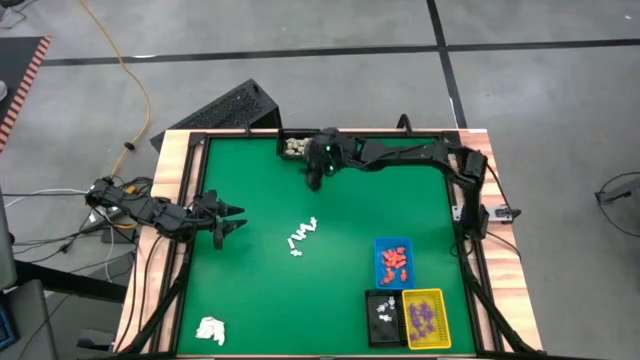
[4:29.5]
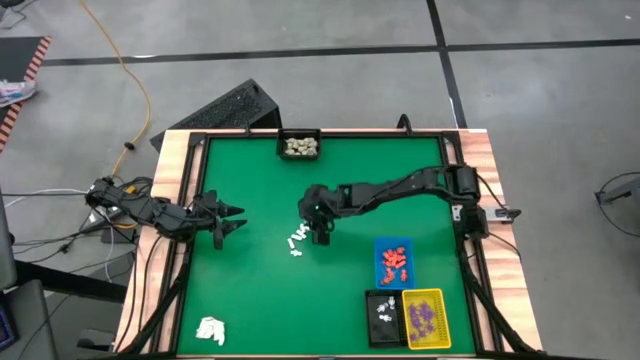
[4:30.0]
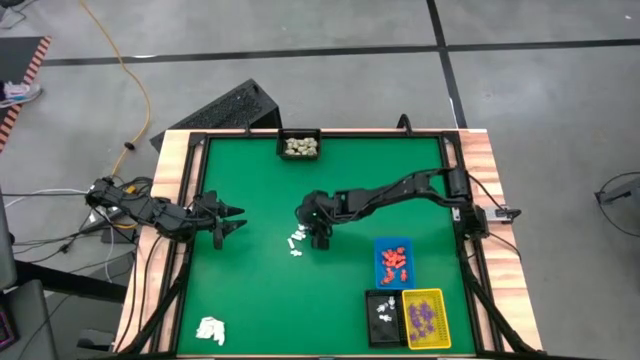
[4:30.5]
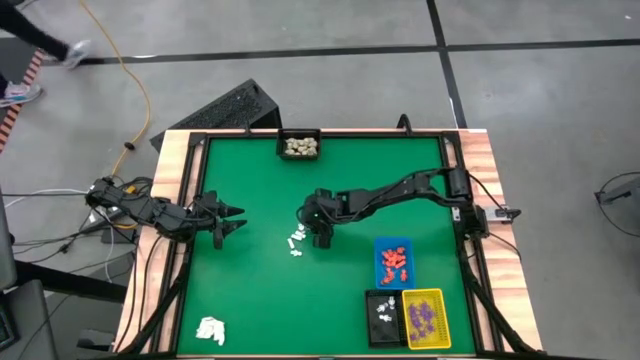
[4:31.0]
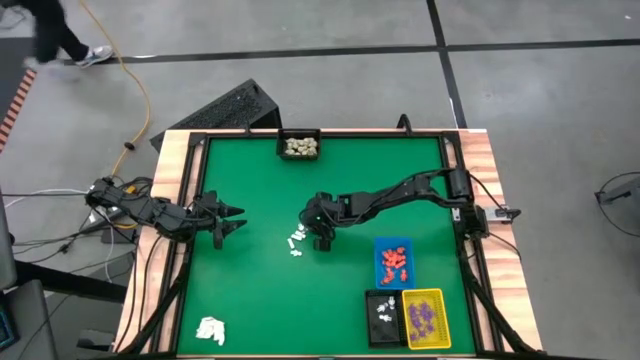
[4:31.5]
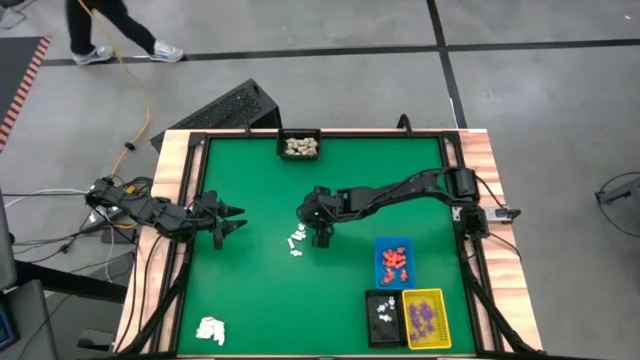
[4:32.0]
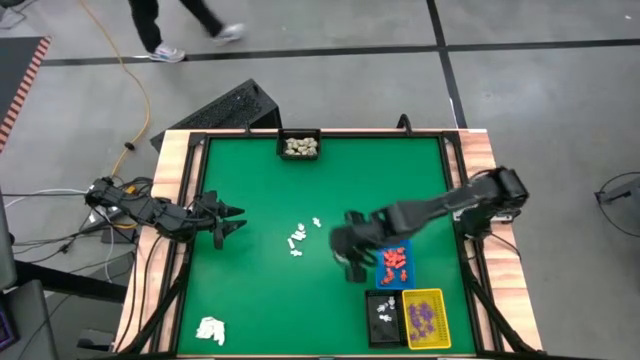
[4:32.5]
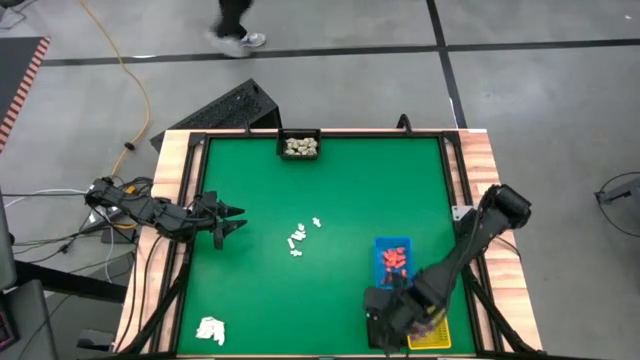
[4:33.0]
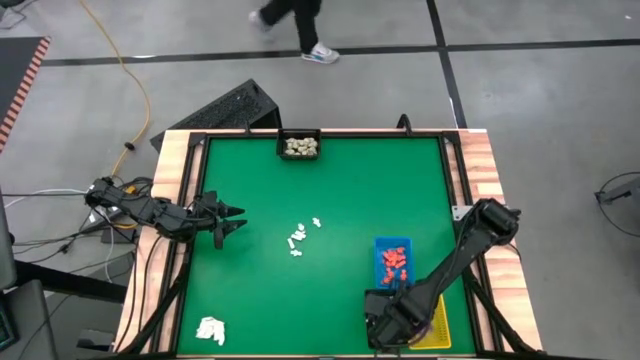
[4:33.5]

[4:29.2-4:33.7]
Task: Sort Halloween decoration
Put the white skeleton toy into the bottom black bin

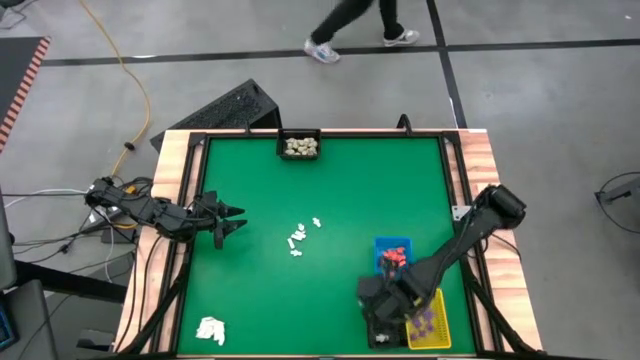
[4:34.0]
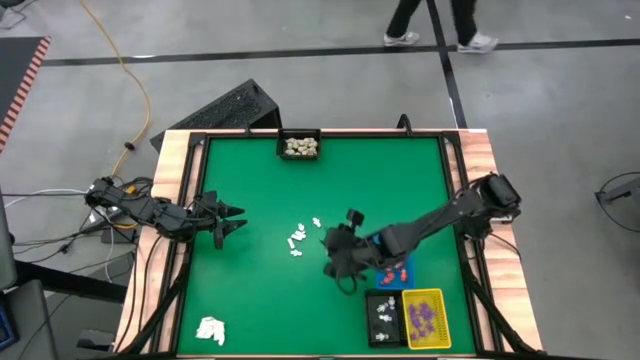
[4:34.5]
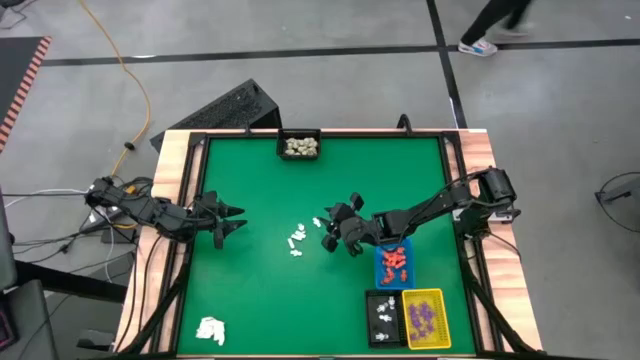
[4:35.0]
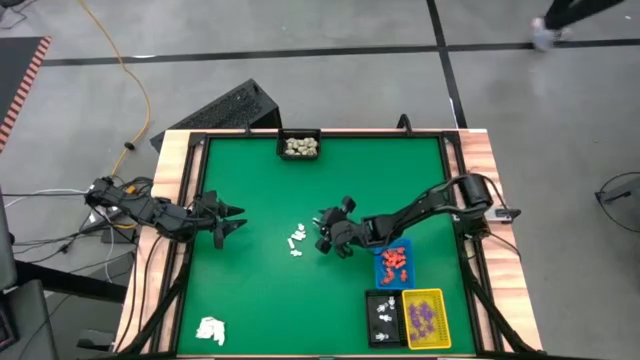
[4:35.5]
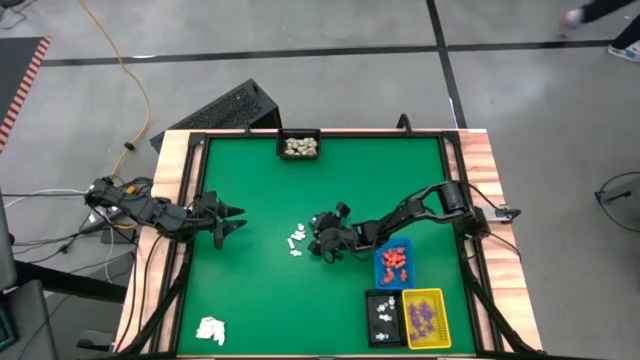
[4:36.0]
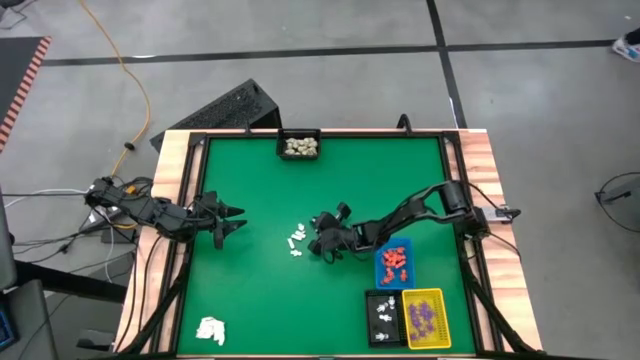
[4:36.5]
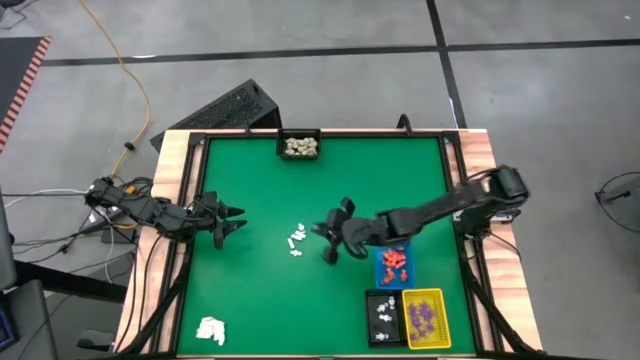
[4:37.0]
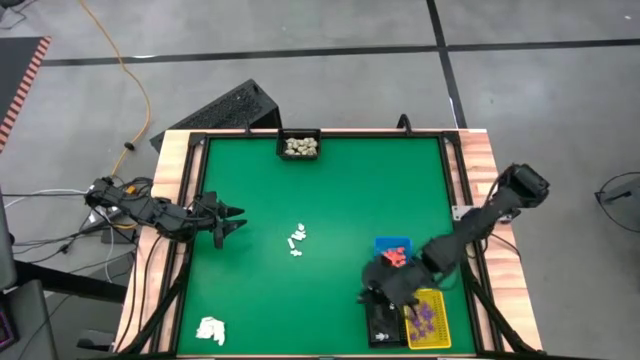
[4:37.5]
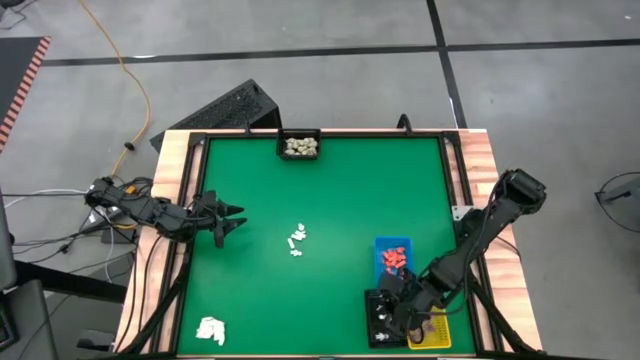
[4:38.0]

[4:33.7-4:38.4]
Put the white skeleton toy into the bottom black bin

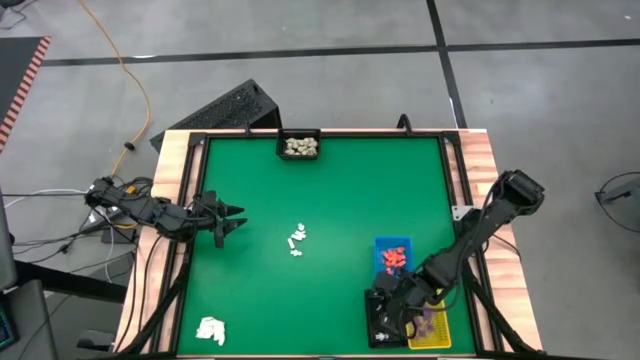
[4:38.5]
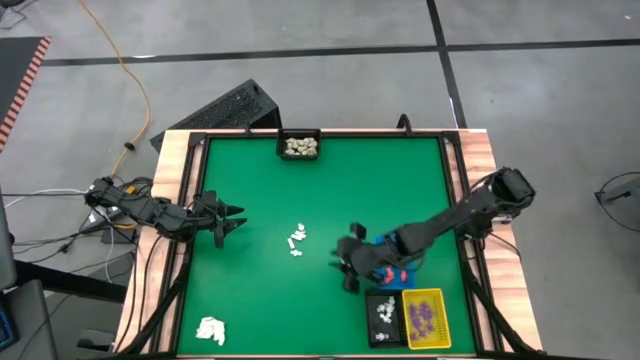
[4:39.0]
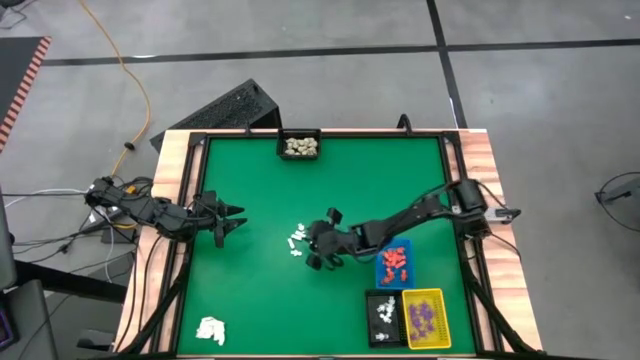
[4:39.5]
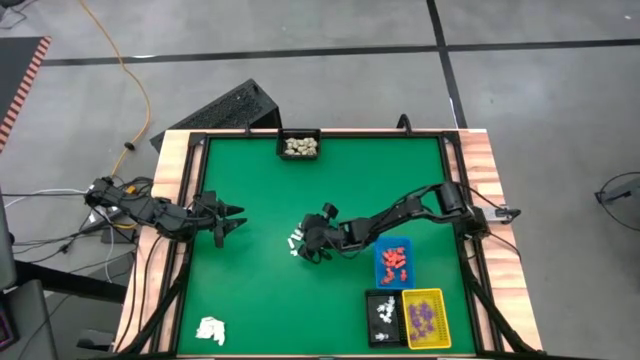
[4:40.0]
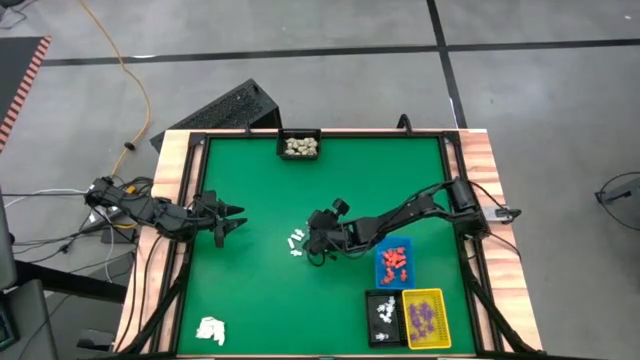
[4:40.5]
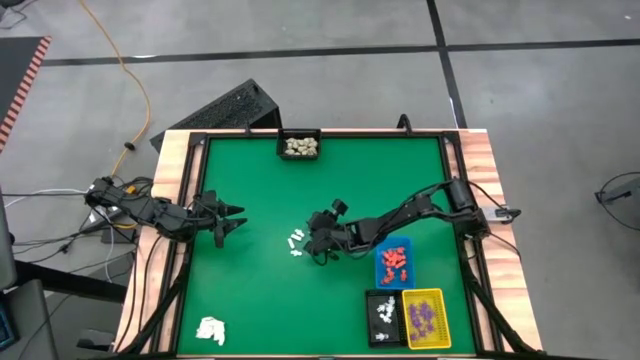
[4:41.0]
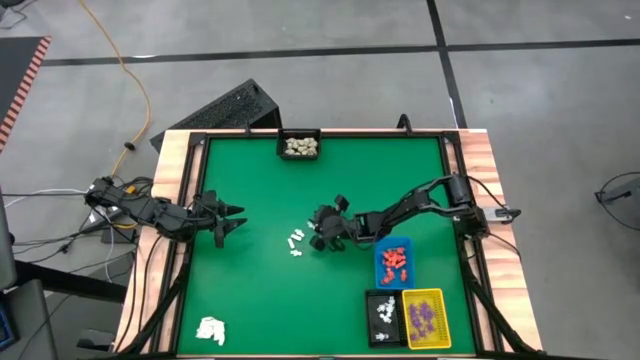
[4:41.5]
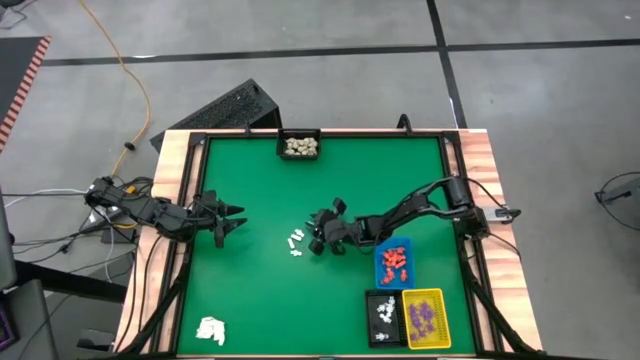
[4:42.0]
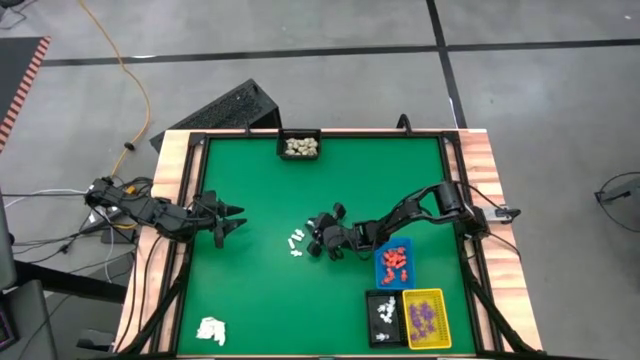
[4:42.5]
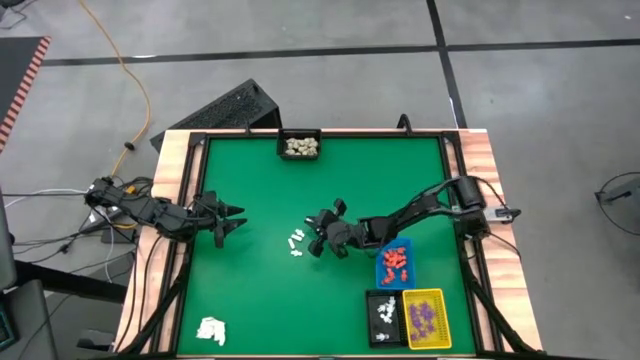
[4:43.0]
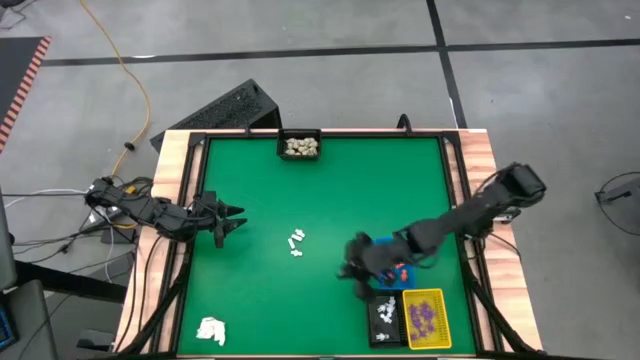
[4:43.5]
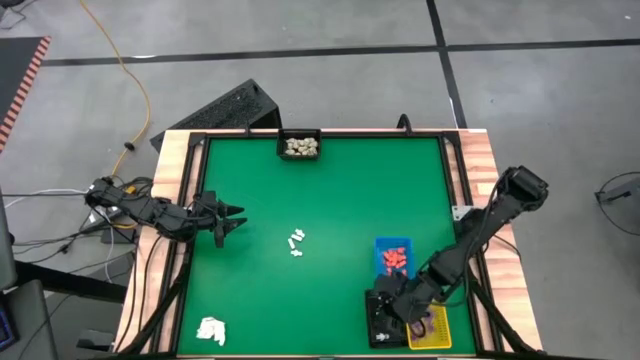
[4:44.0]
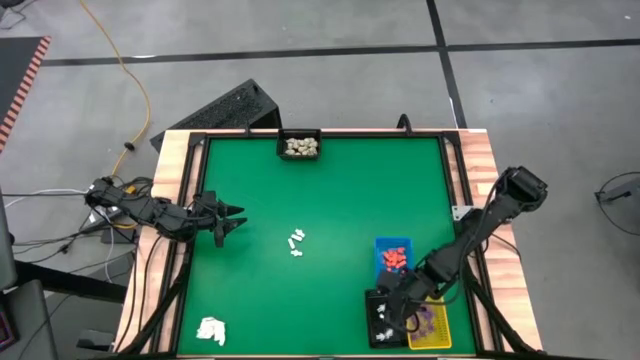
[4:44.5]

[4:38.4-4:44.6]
Put the white skeleton toy into the bottom black bin

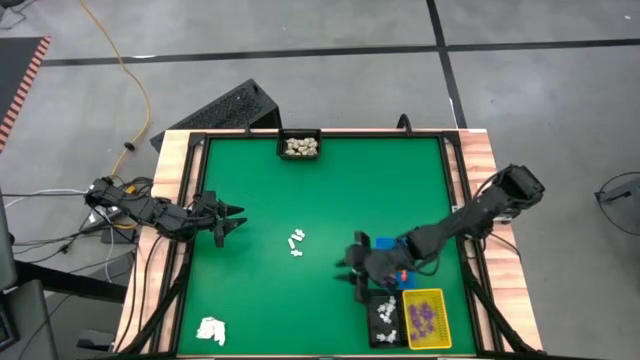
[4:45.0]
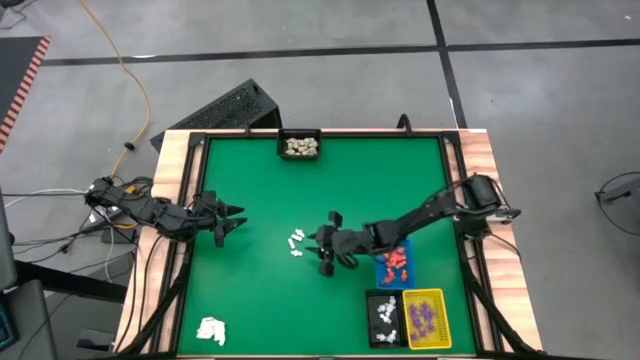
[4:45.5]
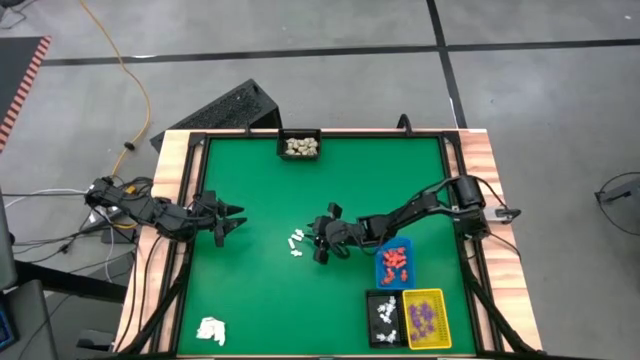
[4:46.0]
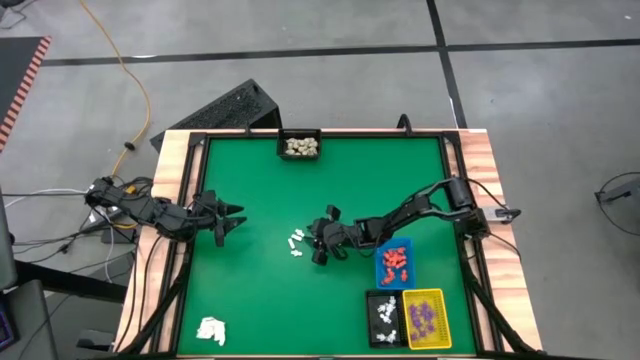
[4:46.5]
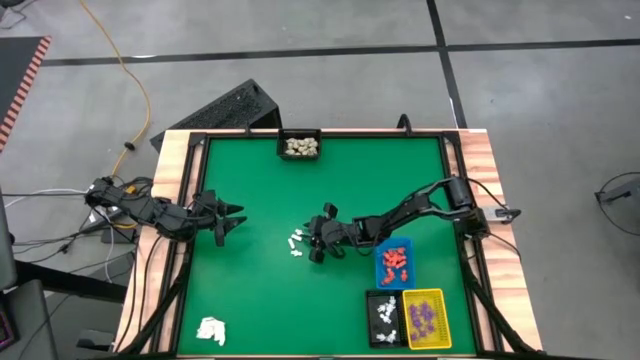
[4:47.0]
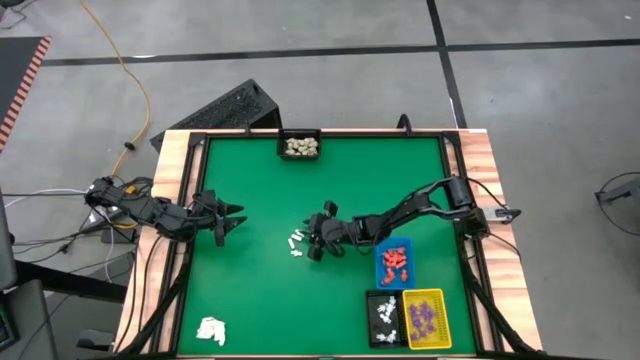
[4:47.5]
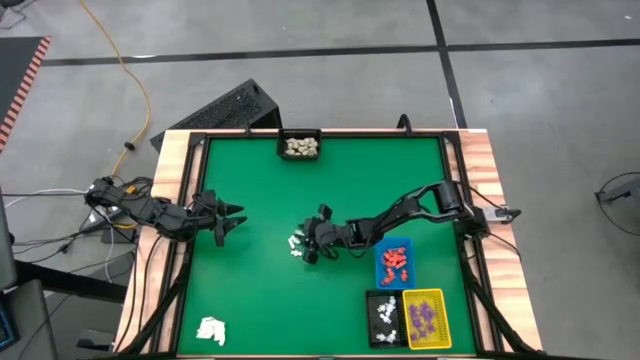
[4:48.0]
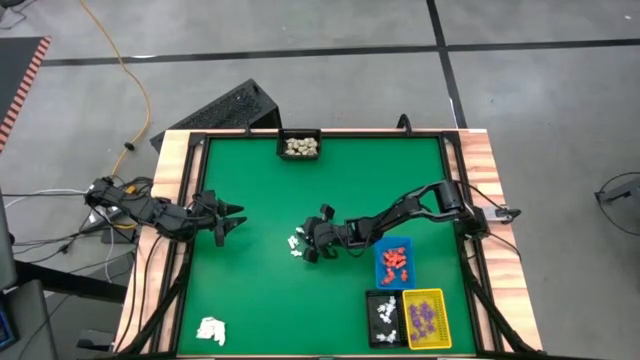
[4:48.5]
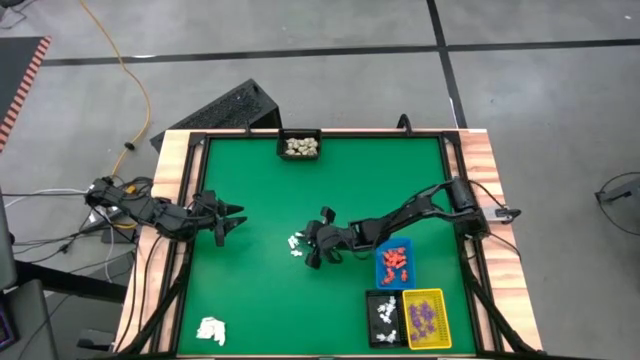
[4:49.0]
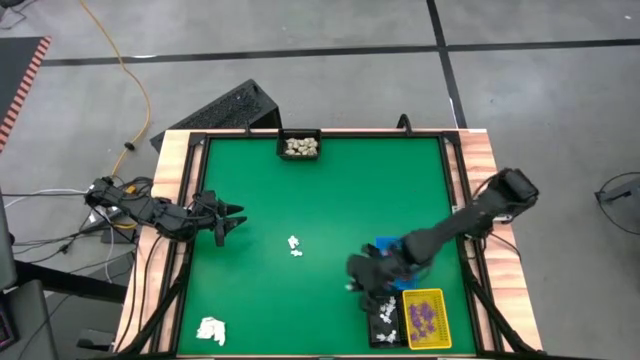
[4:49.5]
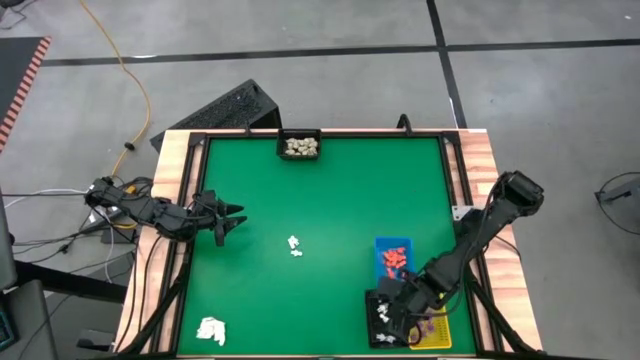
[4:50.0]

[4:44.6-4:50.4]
Put the white skeleton toy into the bottom black bin
